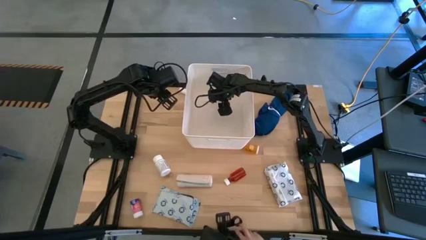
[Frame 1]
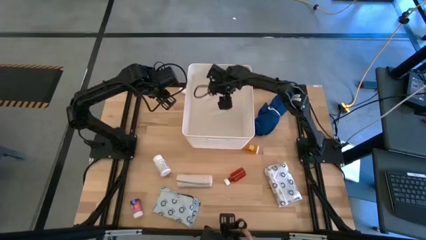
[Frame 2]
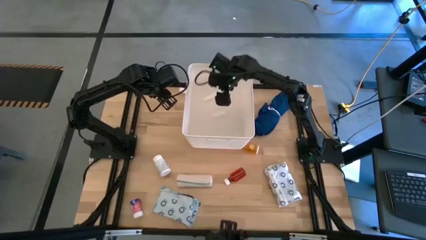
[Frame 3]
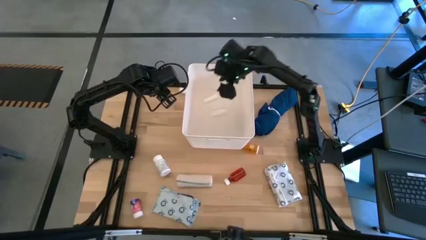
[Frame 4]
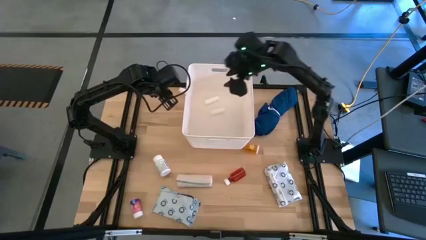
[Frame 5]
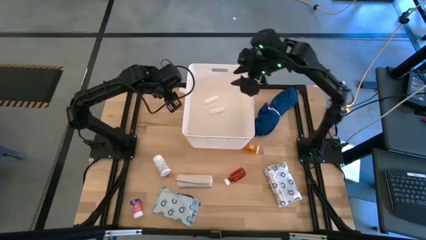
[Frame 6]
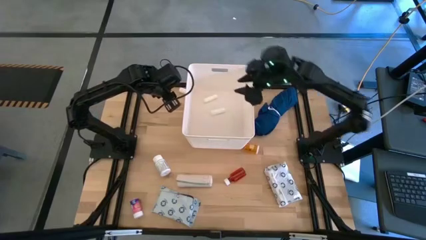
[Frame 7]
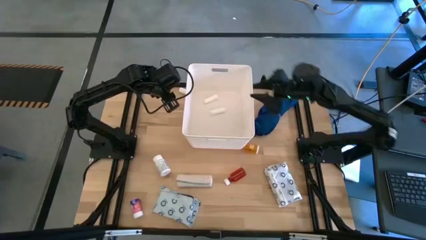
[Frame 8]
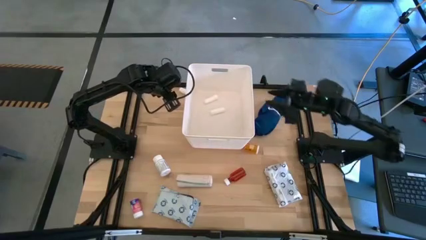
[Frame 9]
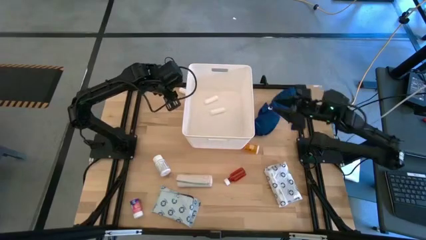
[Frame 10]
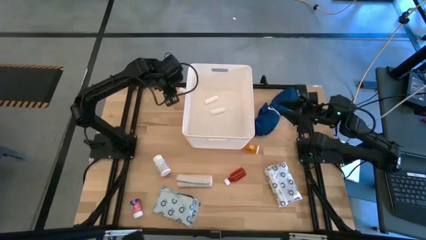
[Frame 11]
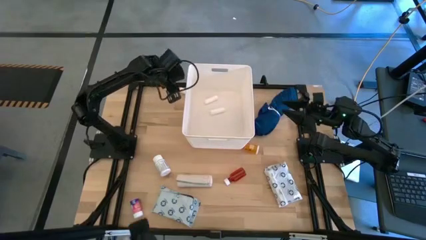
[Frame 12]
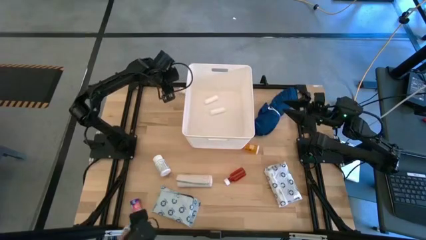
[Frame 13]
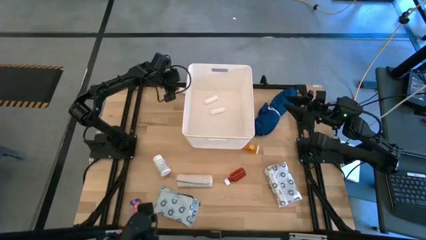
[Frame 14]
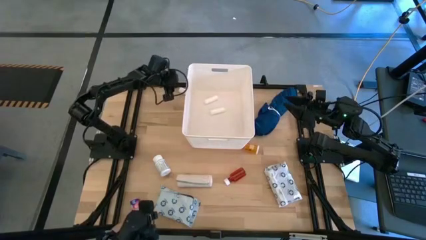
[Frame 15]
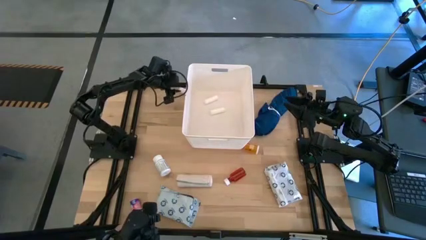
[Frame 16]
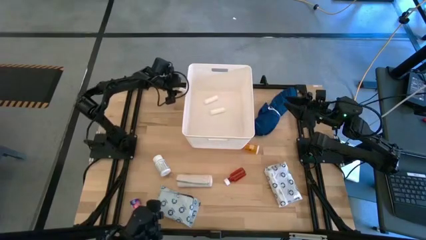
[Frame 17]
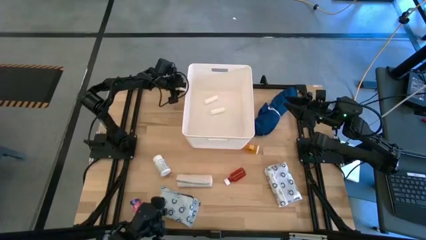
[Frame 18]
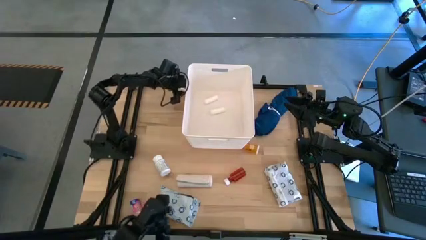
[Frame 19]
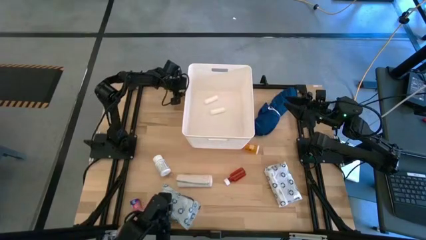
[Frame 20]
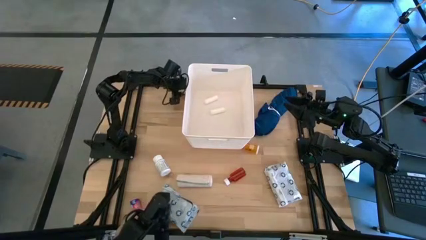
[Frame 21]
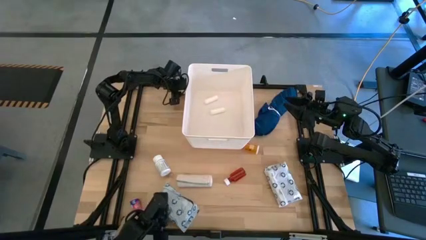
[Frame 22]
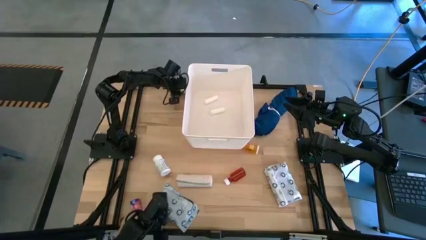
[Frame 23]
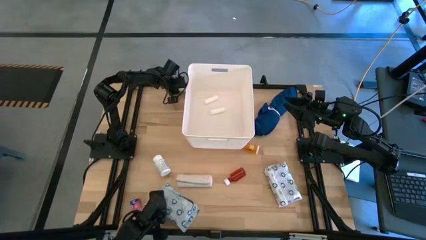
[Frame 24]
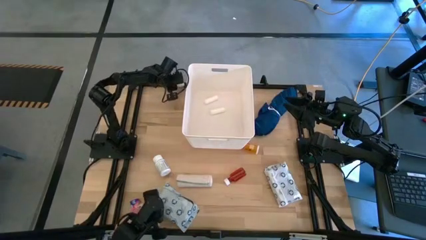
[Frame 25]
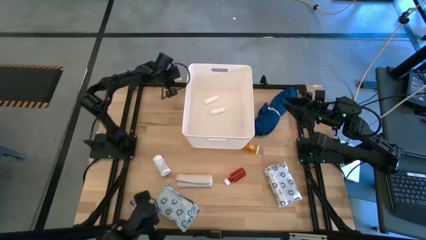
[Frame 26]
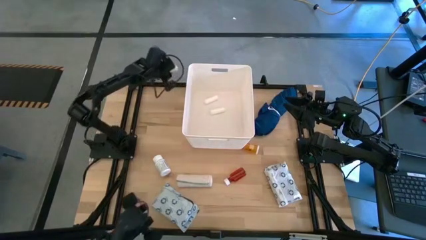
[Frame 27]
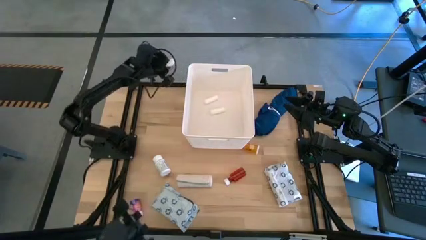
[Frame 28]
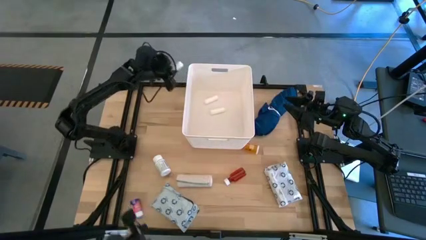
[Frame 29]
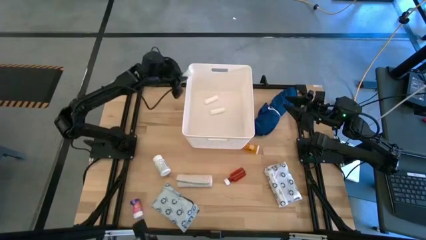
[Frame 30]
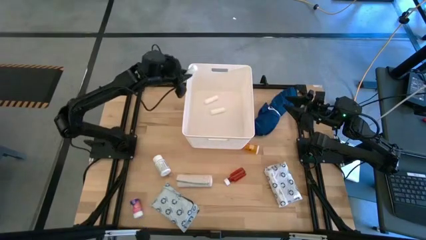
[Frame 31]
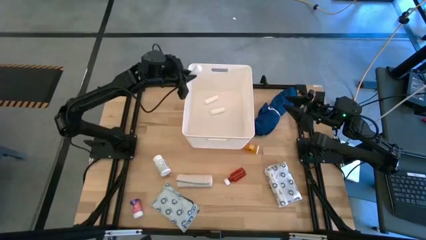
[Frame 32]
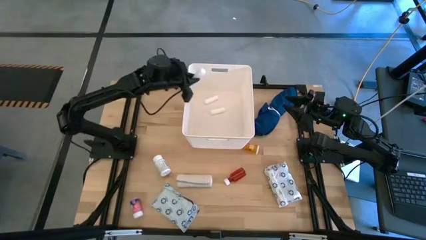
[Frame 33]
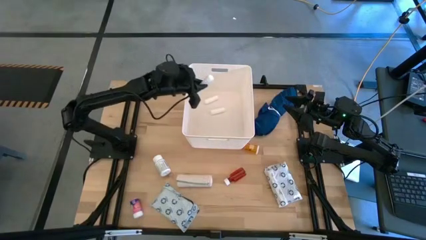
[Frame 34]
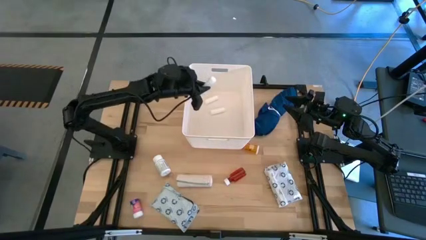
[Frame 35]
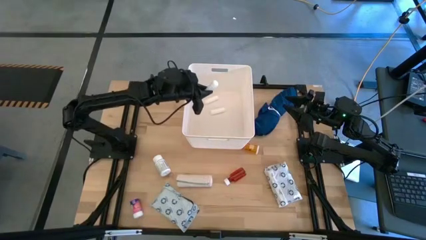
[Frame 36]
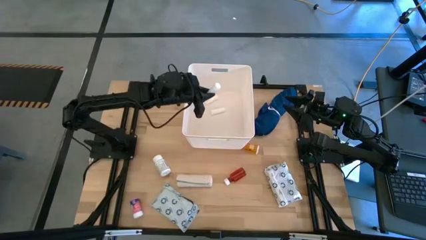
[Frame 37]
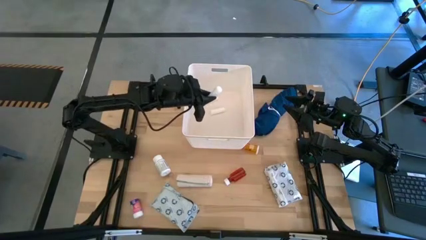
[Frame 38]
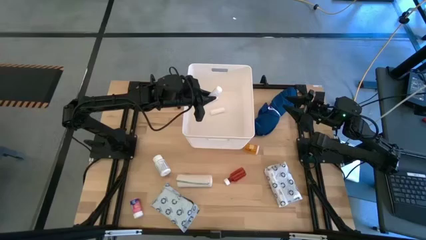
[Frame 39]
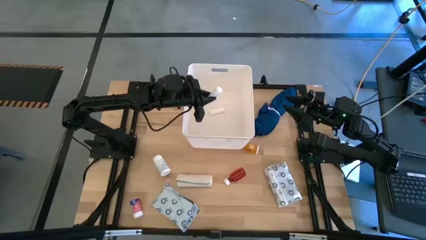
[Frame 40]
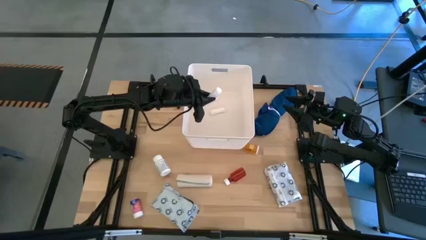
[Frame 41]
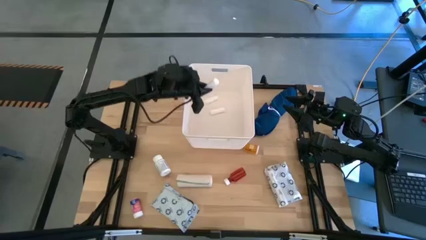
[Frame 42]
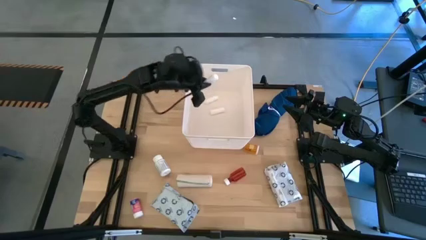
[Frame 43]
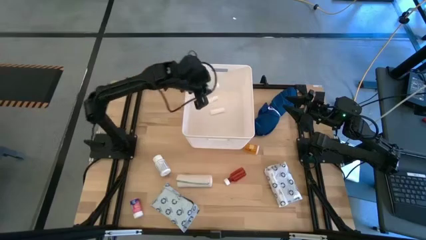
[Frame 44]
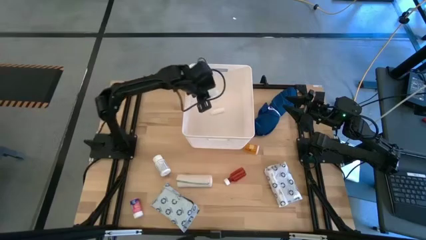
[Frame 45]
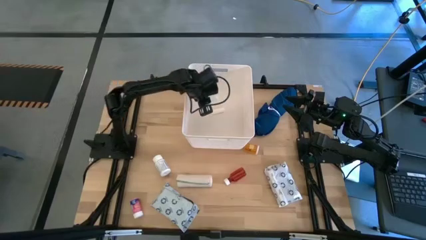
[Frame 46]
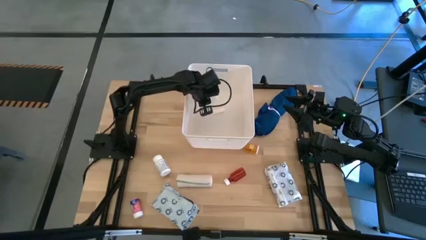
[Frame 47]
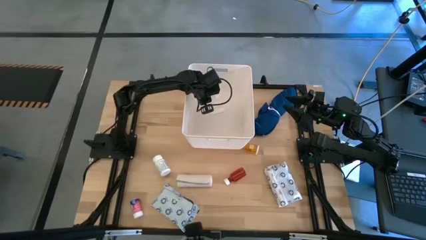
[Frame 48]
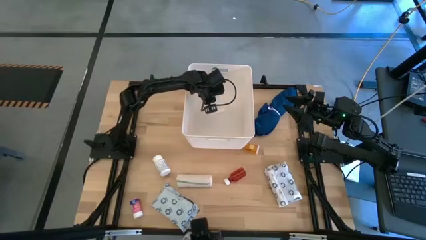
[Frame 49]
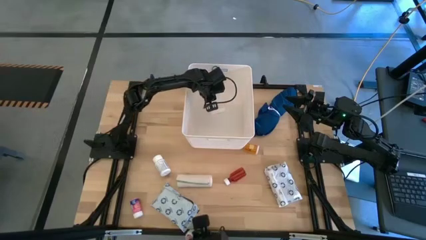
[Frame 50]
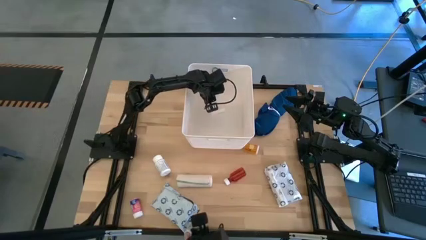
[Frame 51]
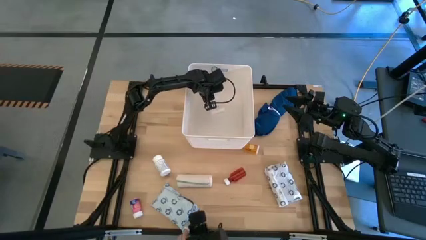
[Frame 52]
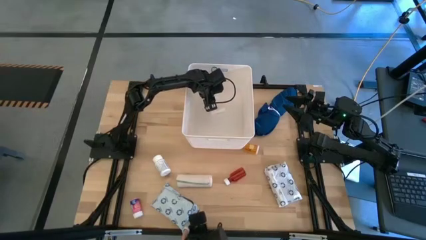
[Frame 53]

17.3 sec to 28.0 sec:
Task: Pick & place medical supplies in basket/bin
Put the white rolled gauze into the white basket

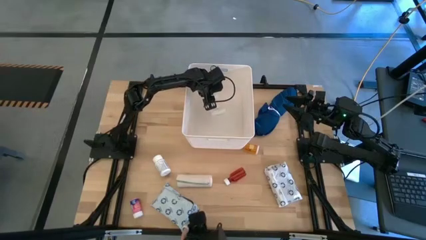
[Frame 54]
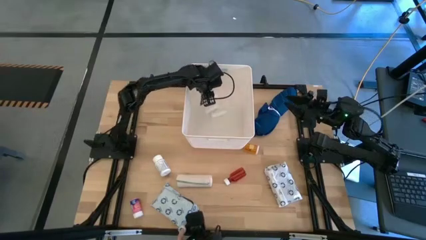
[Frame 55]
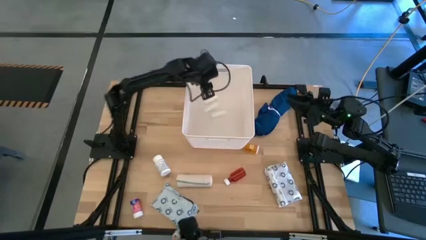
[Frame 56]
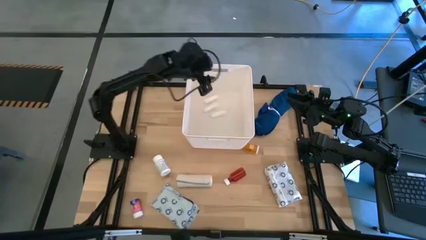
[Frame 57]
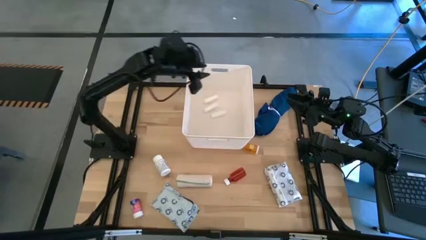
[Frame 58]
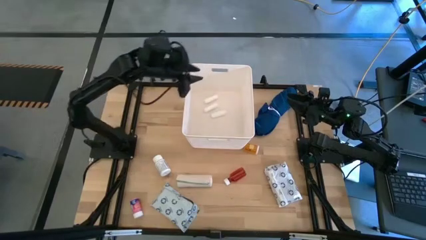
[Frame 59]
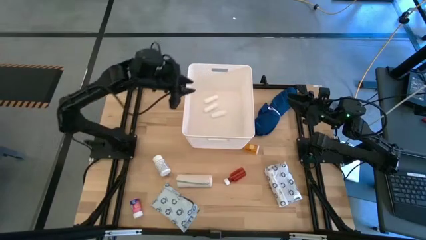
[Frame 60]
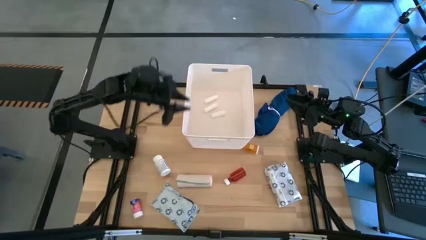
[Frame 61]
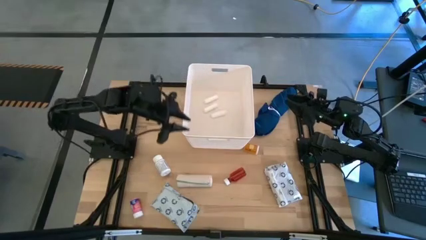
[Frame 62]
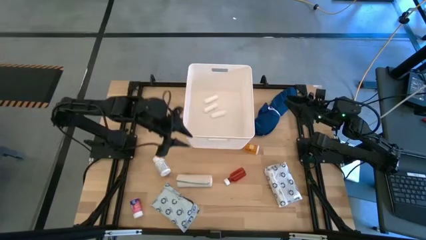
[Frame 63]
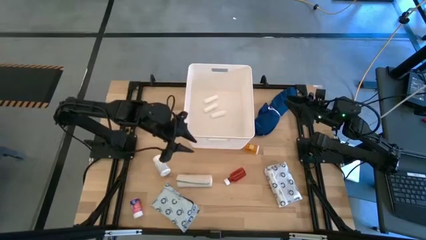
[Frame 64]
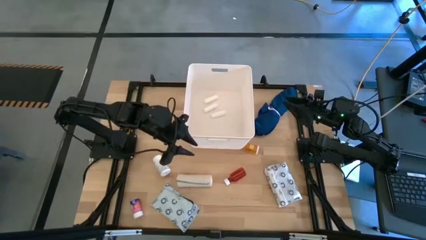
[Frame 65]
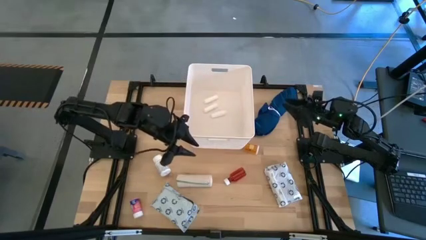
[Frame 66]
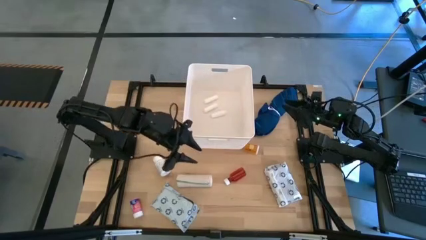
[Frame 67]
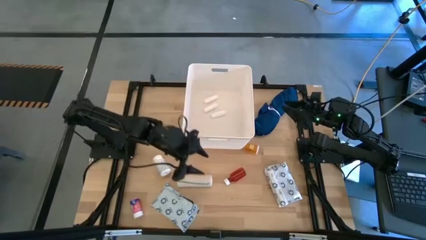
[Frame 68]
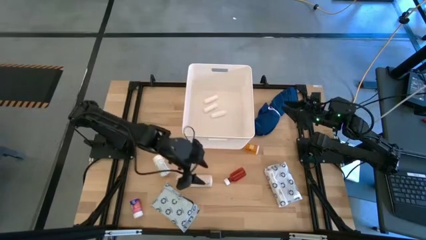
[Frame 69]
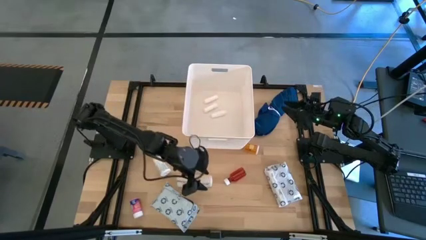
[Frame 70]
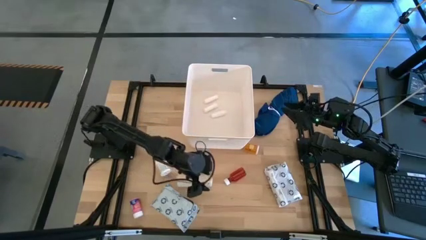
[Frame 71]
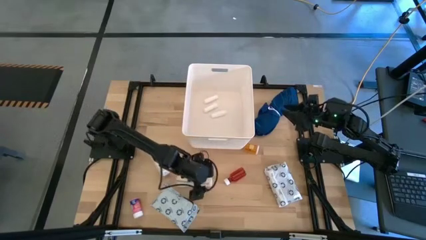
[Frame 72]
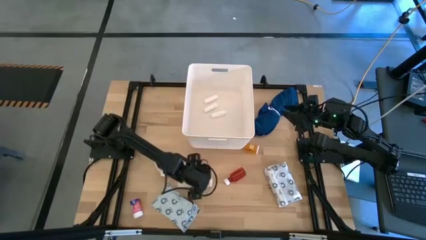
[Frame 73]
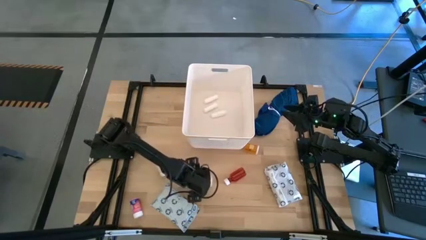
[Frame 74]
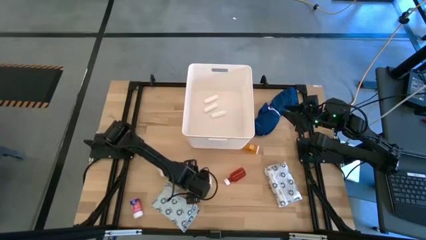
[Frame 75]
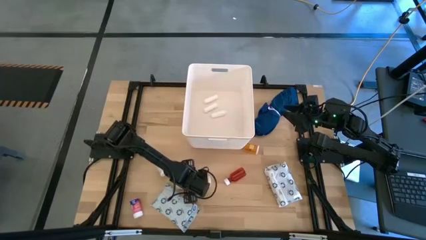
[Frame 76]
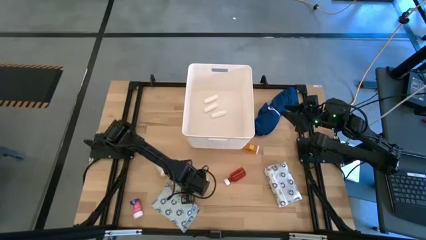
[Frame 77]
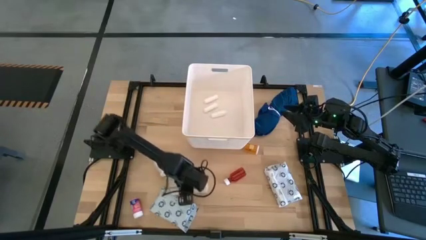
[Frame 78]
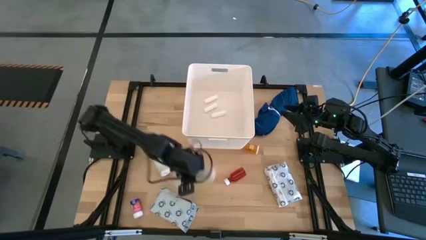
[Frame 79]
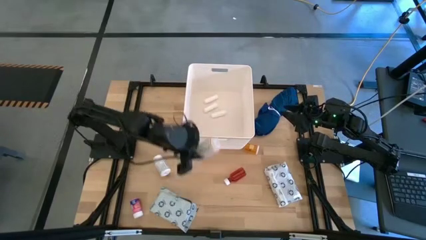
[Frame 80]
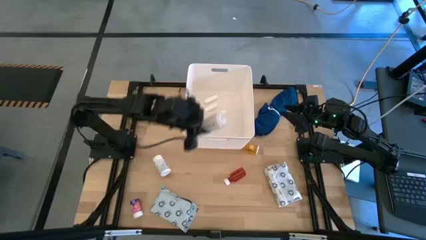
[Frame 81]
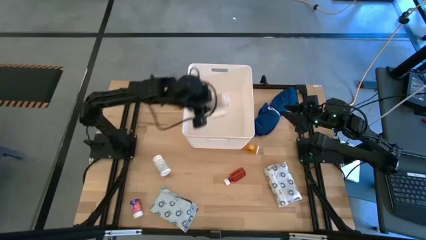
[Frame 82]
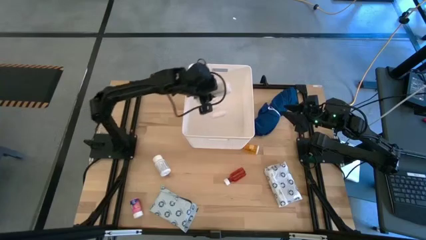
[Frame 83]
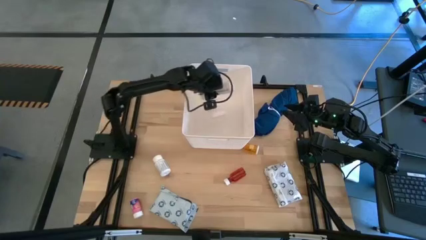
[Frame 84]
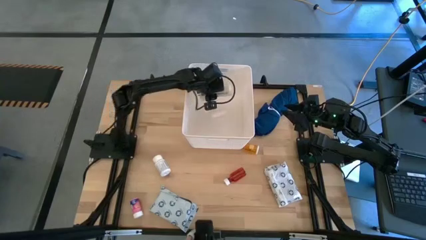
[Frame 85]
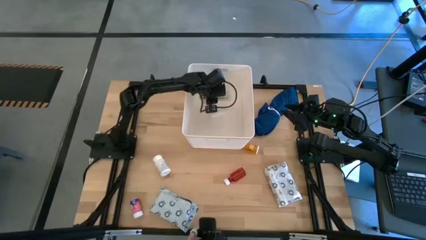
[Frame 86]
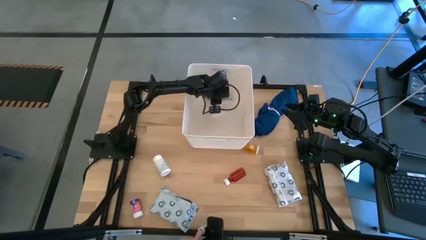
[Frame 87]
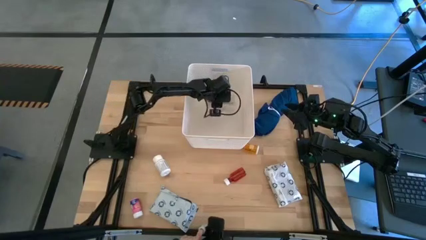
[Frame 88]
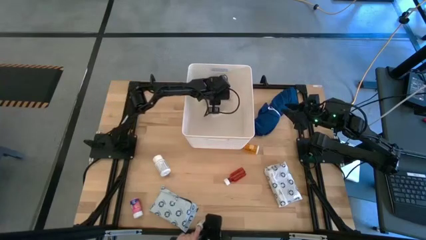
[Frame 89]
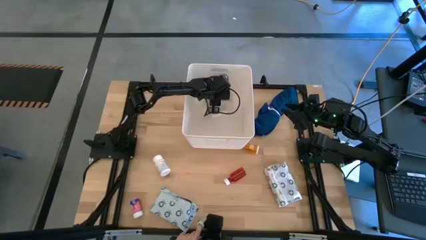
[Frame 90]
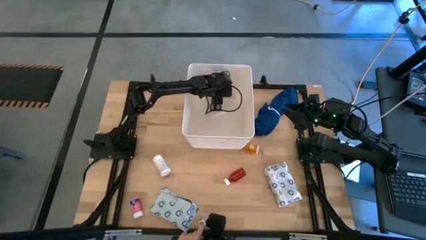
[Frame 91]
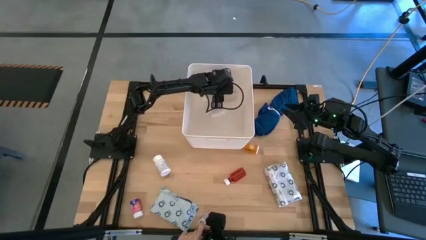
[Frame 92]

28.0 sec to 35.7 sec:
Put the white bandage into the white basket
